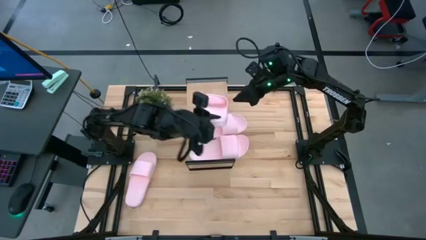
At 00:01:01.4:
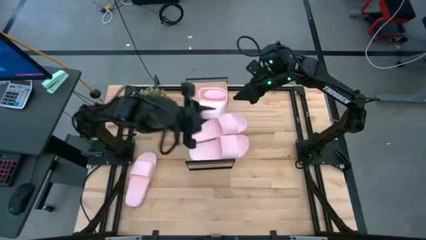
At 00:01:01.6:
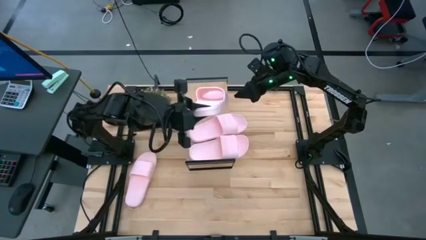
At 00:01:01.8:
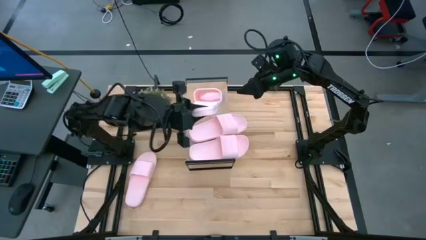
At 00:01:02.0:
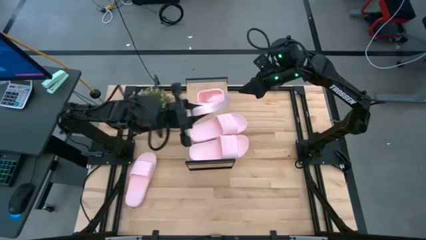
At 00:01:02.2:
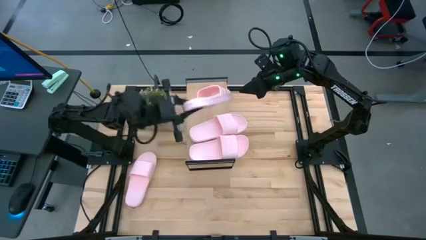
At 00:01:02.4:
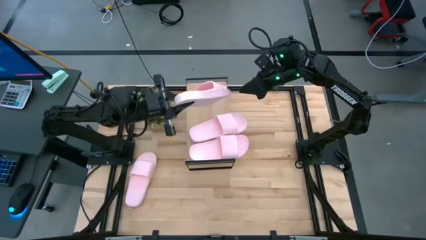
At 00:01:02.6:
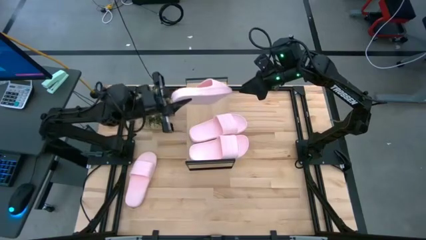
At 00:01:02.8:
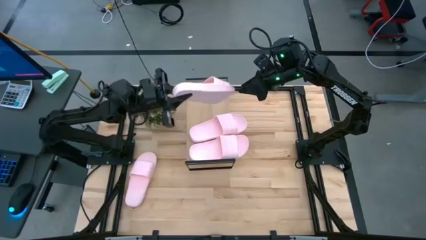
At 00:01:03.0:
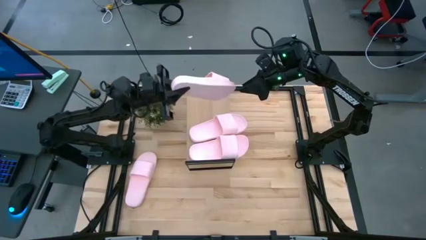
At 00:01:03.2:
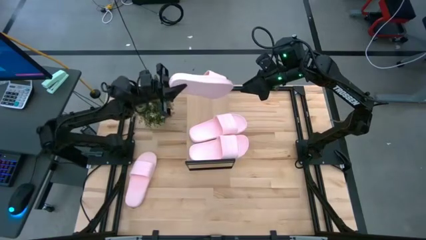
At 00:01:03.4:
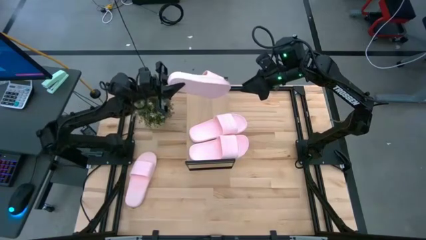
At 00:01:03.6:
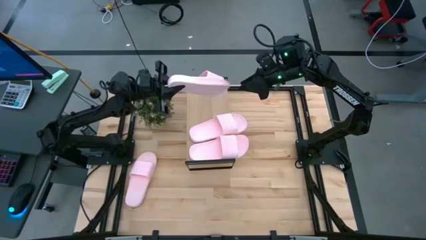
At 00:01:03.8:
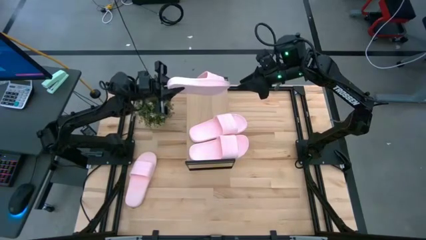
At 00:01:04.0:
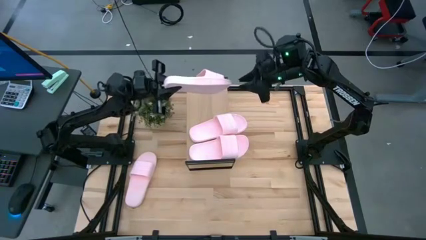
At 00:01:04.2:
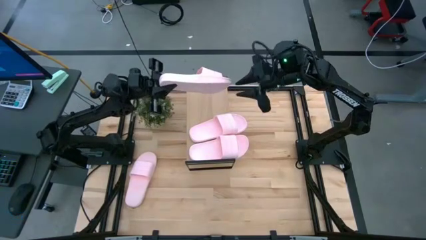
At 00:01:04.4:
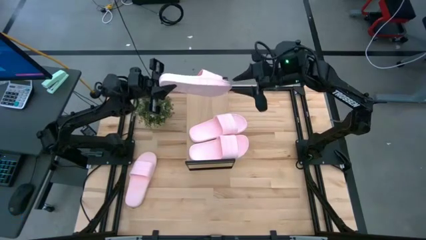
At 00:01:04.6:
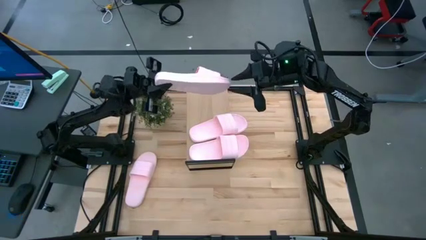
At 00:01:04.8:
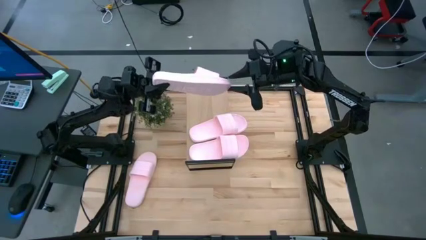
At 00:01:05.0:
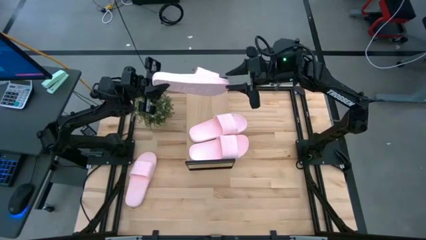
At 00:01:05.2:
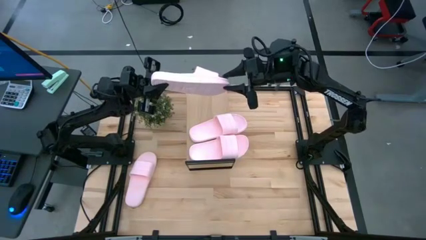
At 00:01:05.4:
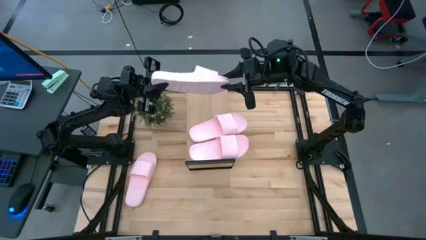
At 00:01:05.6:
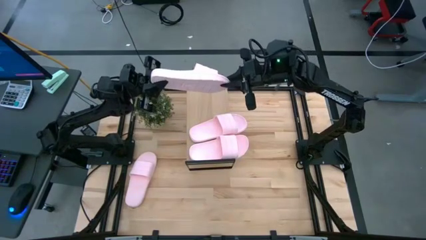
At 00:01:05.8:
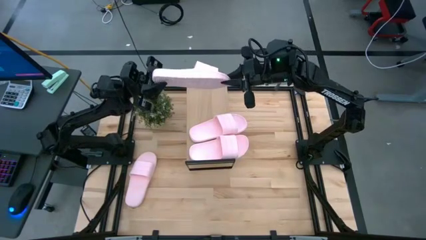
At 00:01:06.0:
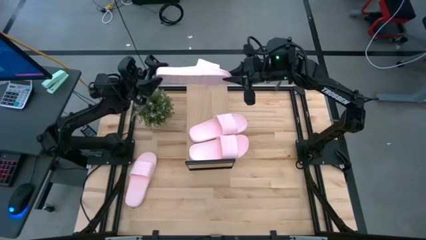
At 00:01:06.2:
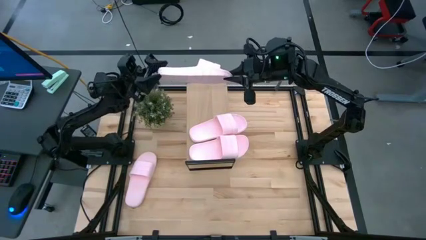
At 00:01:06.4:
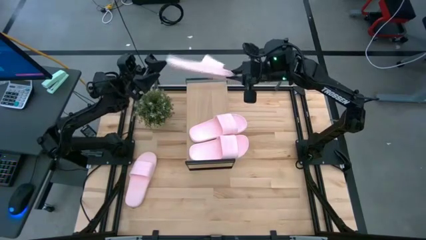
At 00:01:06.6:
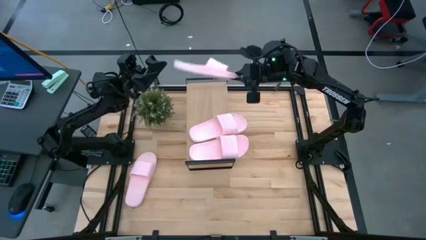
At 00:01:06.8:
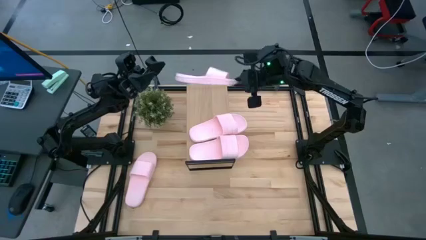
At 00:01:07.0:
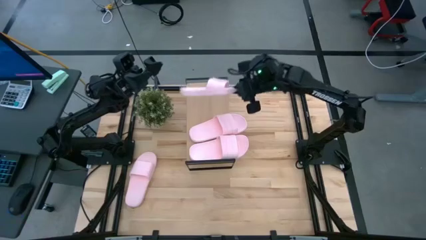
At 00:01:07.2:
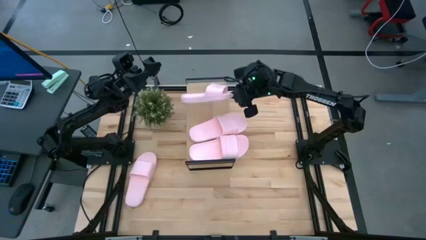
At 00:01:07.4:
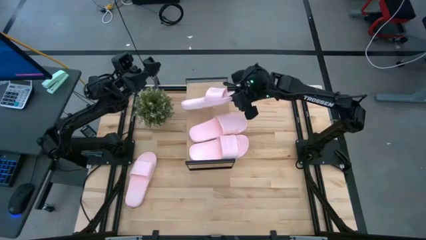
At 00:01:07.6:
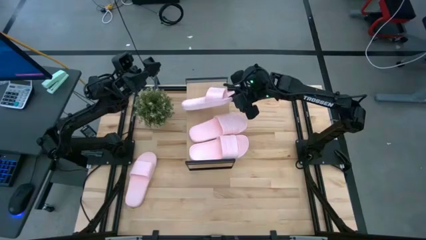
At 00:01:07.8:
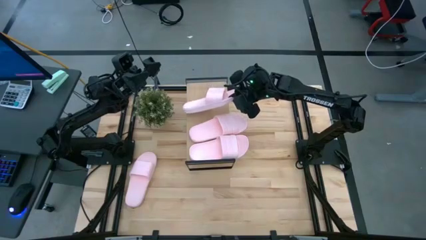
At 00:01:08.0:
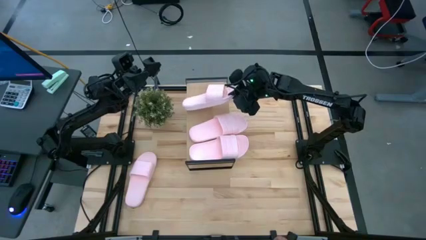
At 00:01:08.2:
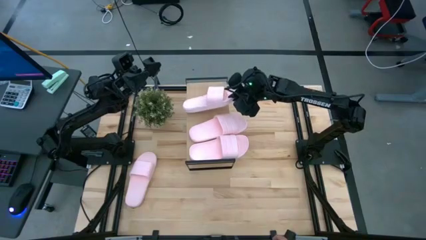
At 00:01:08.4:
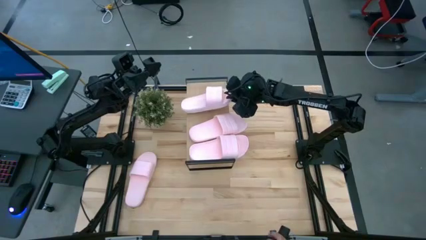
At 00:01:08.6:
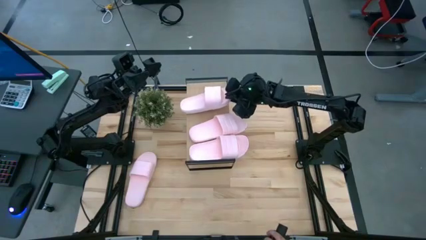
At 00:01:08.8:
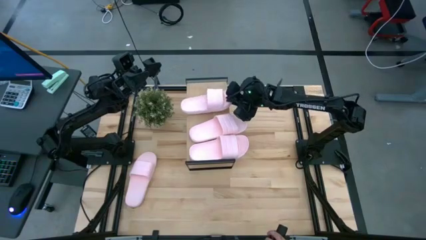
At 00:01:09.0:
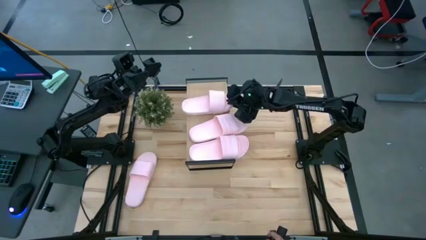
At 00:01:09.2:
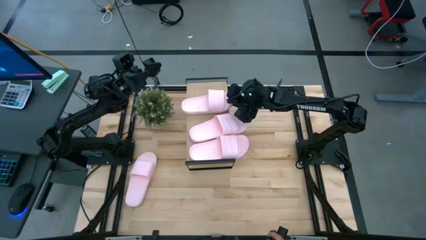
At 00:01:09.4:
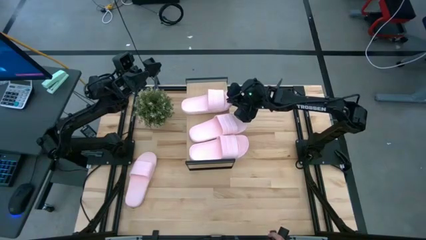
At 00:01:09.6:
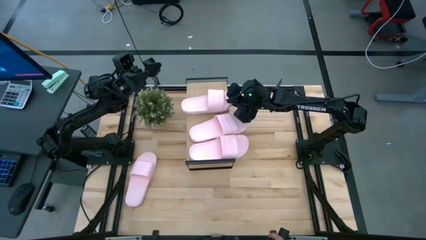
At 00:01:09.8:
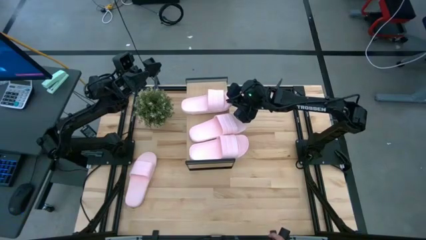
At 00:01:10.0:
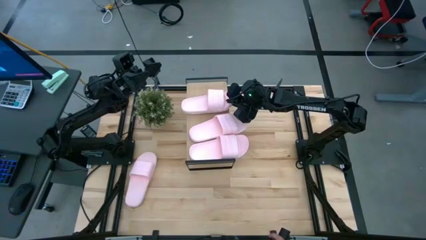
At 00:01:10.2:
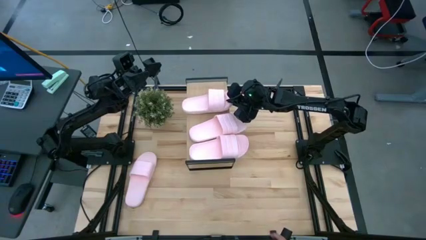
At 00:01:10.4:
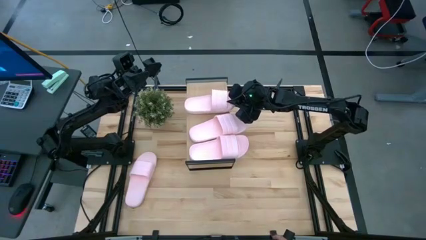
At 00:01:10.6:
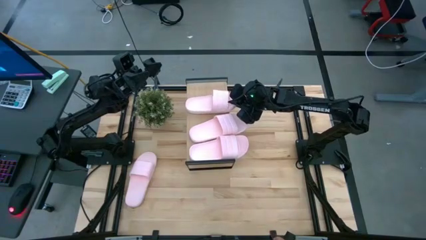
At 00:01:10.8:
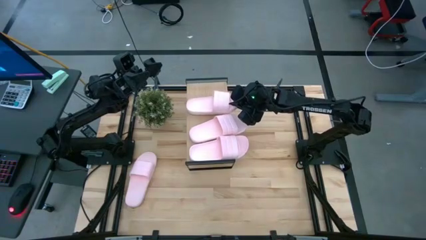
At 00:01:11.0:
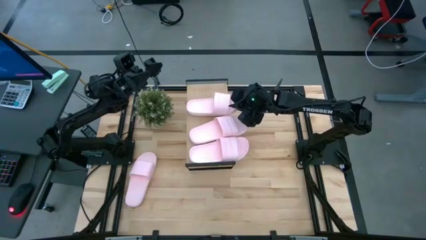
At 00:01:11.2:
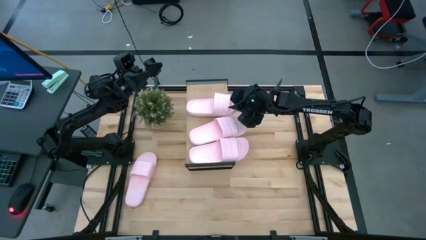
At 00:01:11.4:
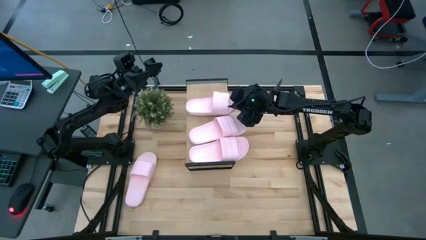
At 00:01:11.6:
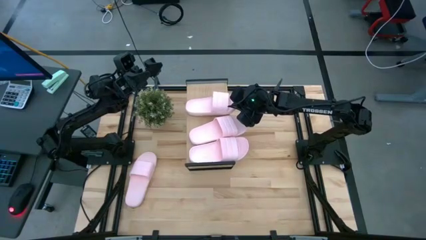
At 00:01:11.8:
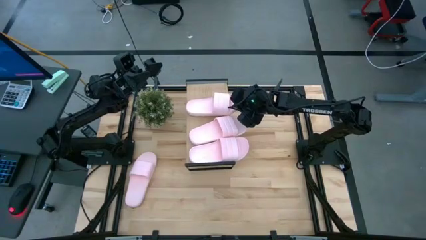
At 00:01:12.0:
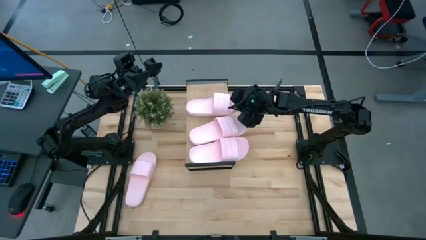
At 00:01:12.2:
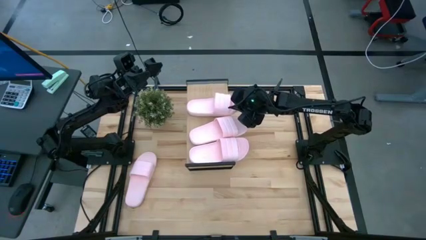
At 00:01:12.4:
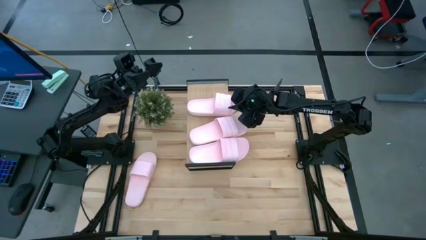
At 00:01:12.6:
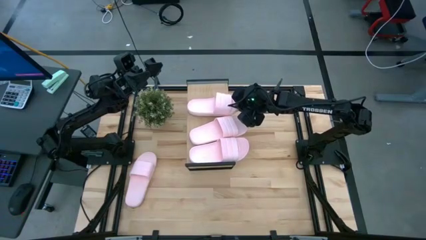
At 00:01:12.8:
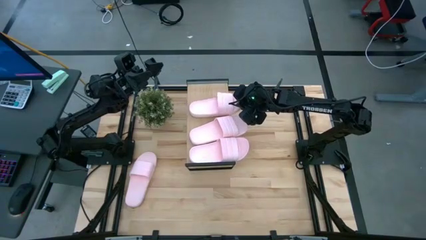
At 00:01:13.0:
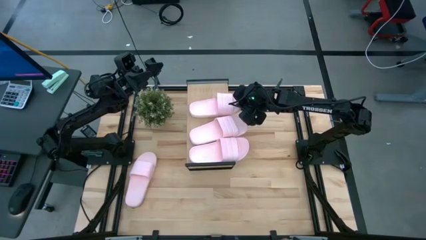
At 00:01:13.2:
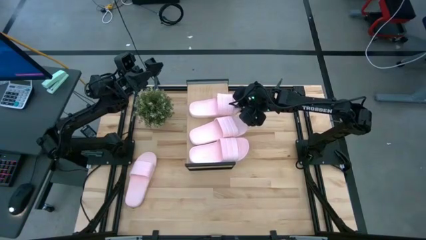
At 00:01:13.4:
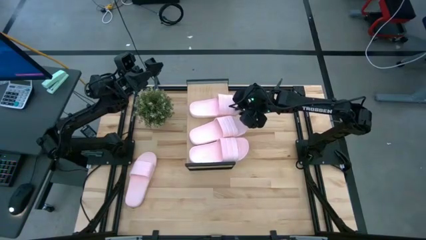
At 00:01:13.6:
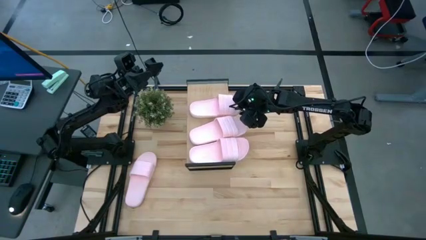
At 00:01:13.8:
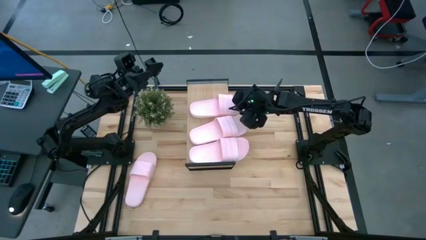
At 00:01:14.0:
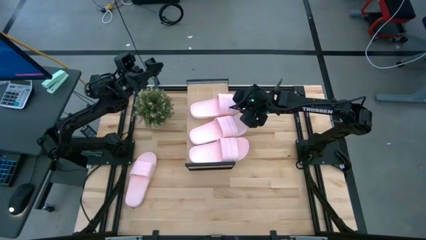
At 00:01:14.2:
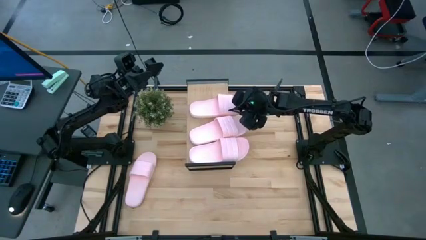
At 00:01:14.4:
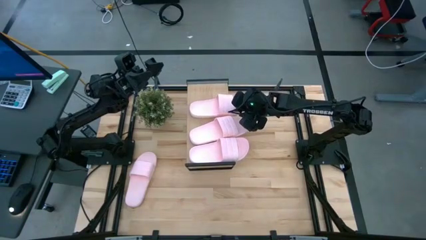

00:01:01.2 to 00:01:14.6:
Task: Pick and place slides into the shelf
Put the pink slide on the shelf

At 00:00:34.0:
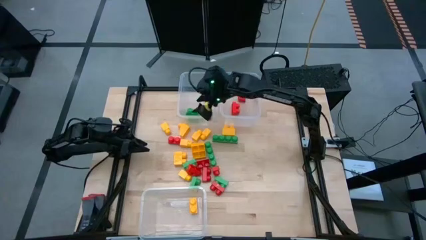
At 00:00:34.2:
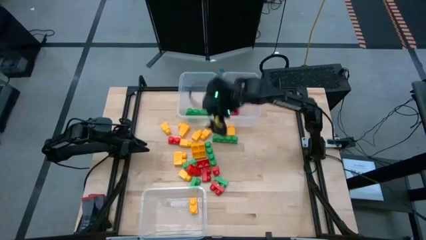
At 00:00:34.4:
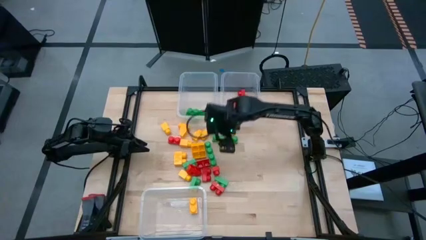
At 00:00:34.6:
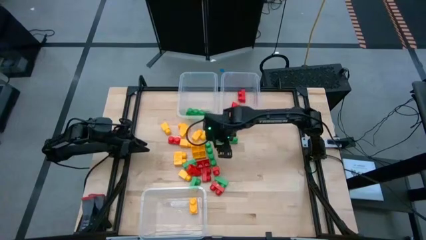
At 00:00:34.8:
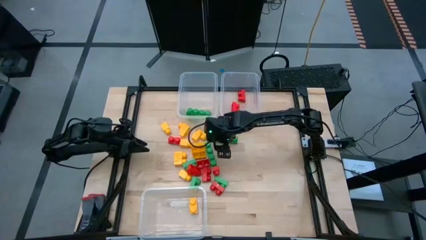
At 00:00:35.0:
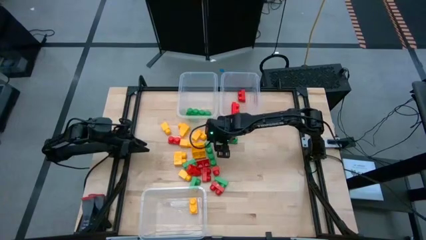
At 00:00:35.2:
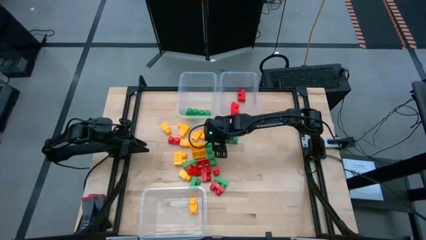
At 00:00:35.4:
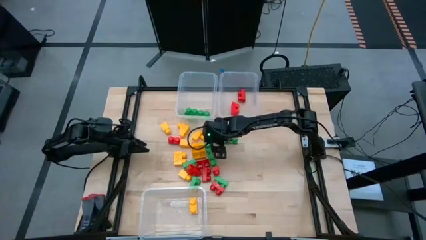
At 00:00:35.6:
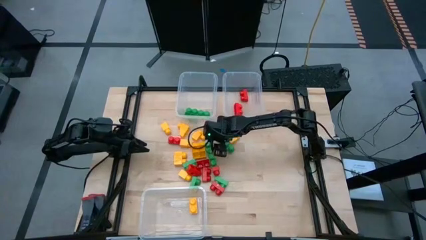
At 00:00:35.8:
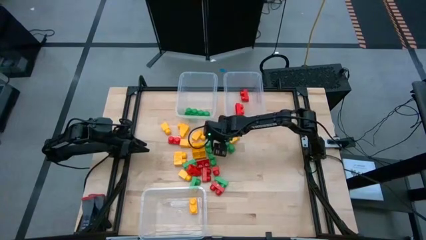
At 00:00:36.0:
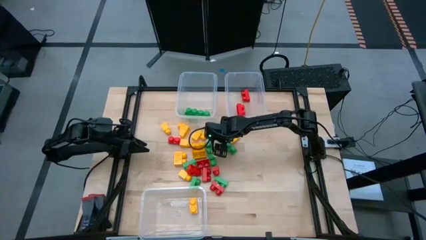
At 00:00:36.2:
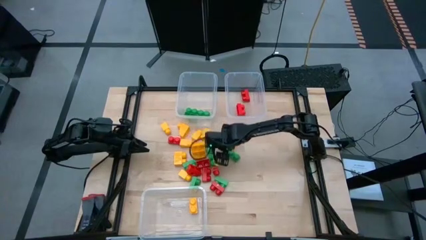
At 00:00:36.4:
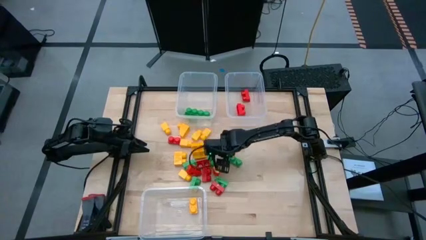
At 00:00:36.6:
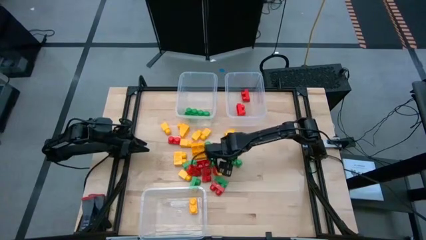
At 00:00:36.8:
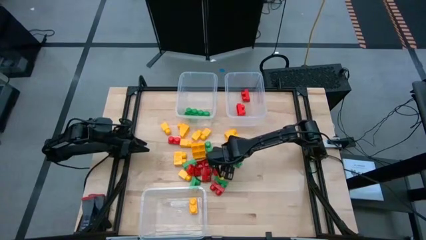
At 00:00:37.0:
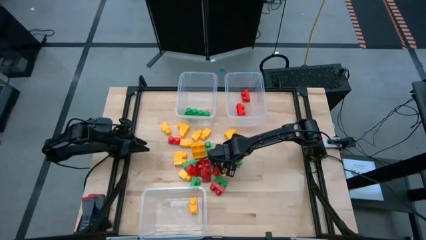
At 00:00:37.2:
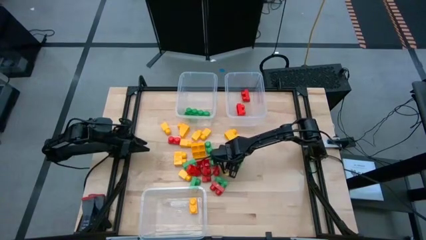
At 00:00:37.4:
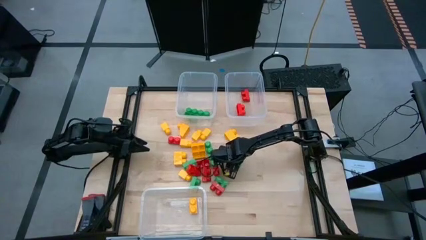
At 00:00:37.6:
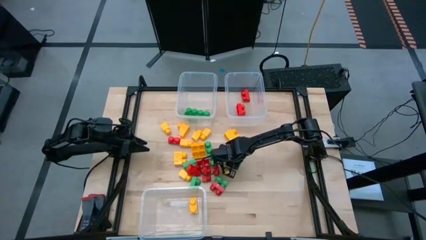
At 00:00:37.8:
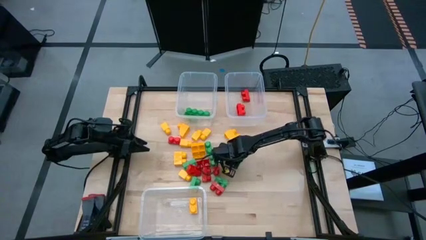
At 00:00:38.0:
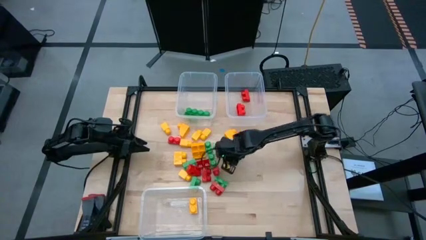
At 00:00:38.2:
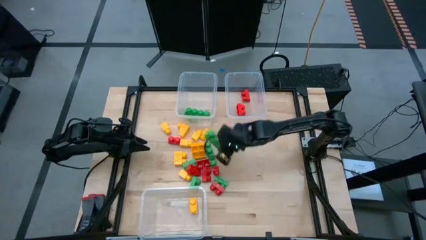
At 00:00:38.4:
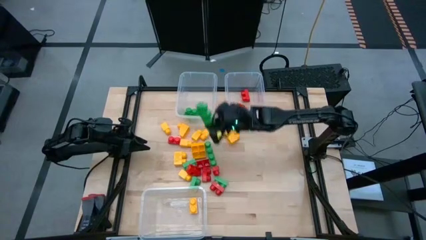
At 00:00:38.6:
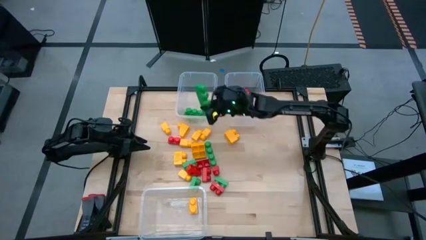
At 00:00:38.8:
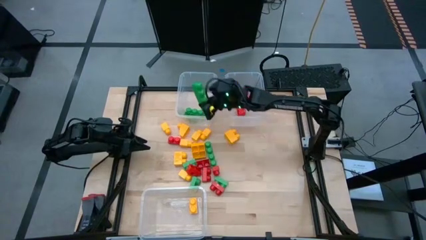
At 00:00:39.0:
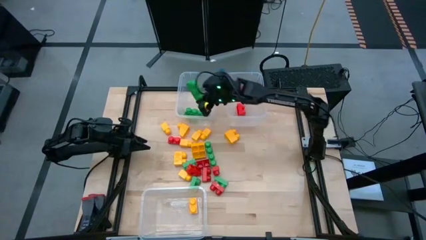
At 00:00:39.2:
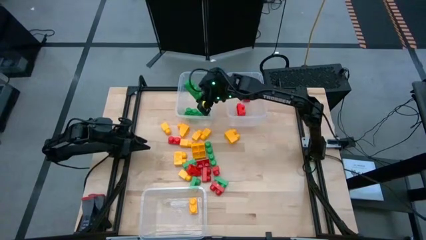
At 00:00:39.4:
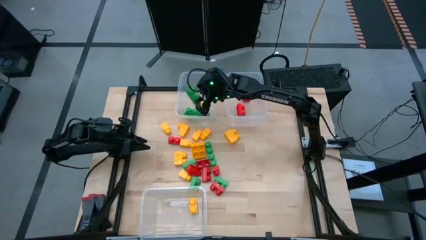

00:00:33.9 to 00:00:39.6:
Task: Sort blocks
Put the green game piece into the top left transparent bin
